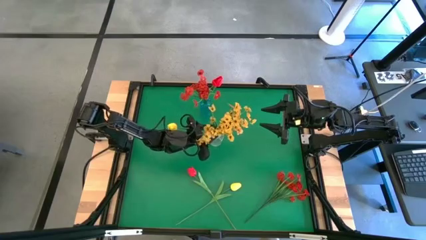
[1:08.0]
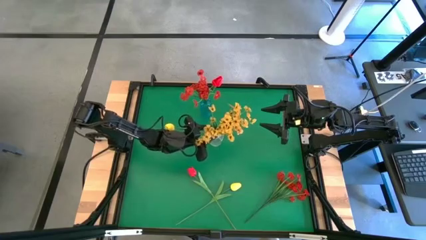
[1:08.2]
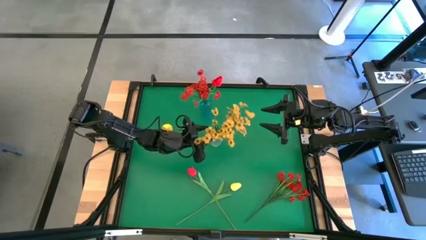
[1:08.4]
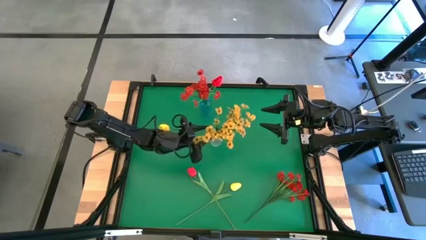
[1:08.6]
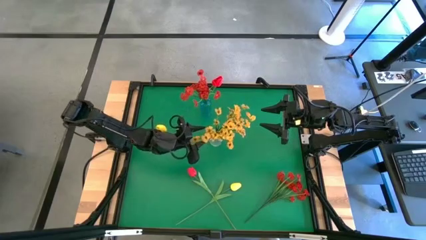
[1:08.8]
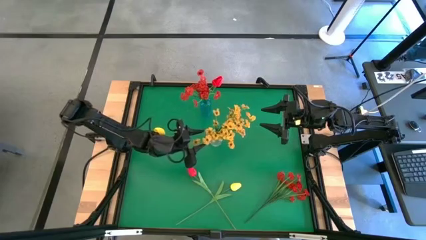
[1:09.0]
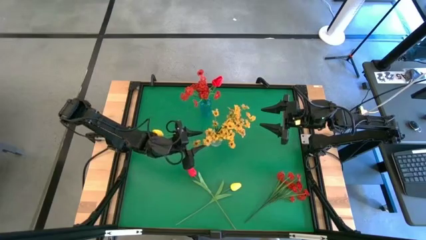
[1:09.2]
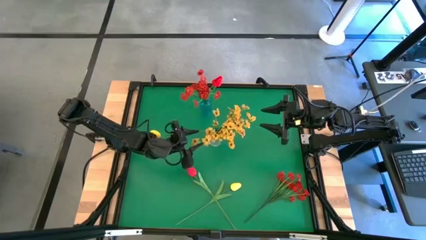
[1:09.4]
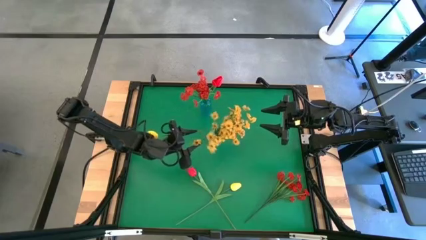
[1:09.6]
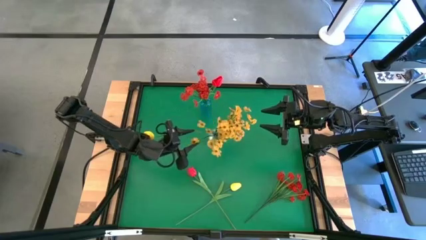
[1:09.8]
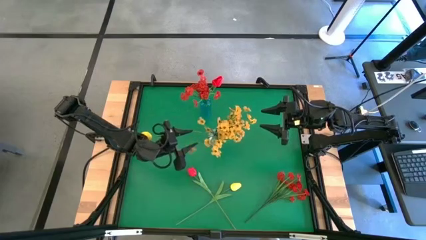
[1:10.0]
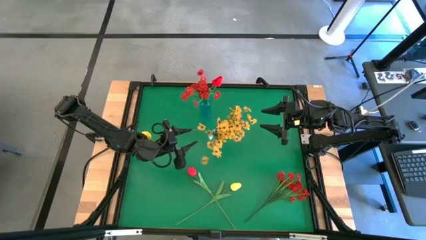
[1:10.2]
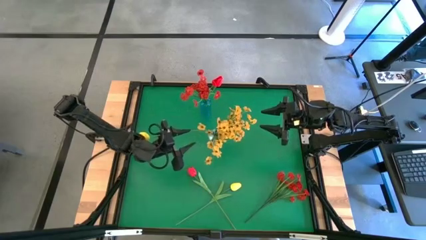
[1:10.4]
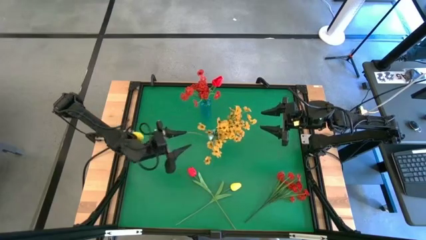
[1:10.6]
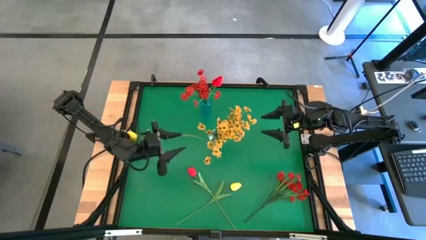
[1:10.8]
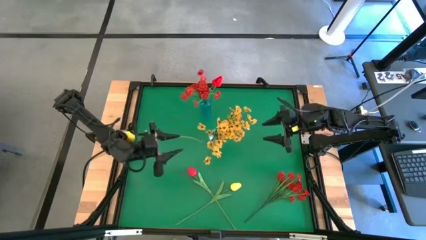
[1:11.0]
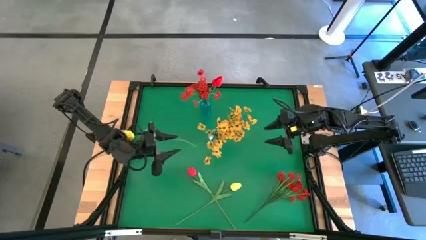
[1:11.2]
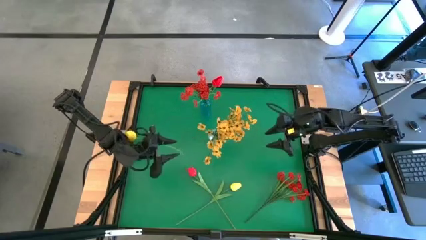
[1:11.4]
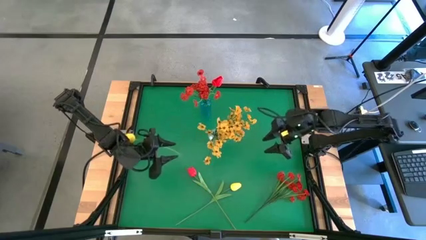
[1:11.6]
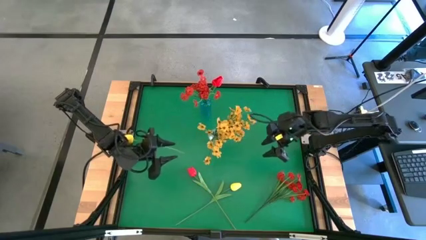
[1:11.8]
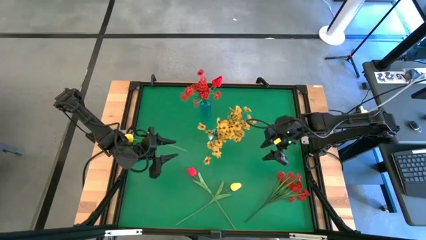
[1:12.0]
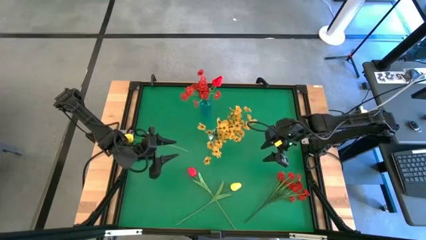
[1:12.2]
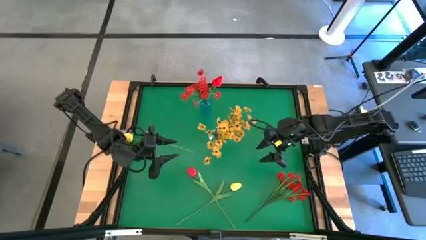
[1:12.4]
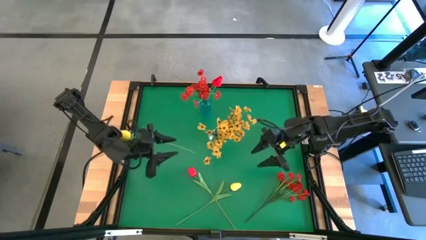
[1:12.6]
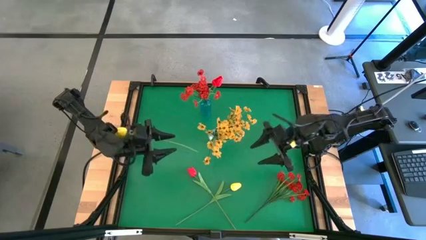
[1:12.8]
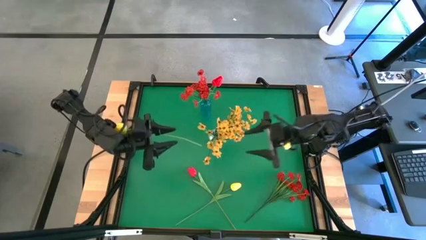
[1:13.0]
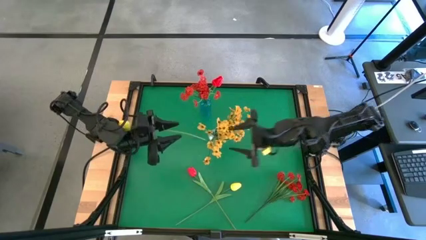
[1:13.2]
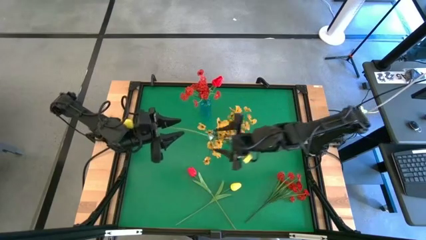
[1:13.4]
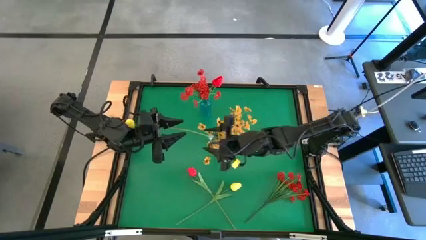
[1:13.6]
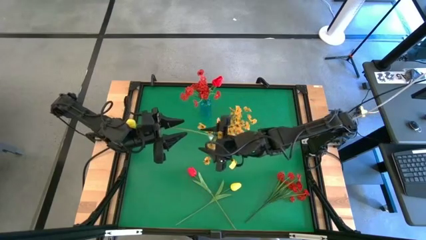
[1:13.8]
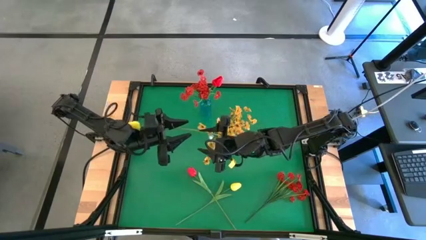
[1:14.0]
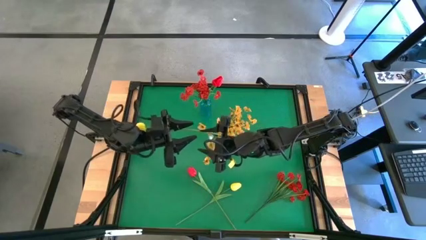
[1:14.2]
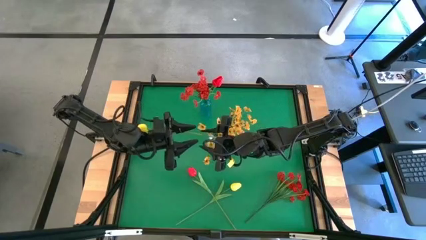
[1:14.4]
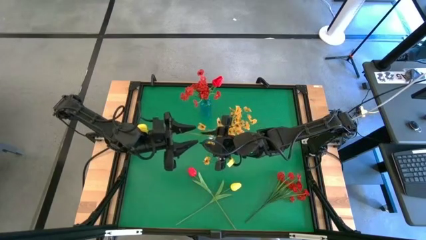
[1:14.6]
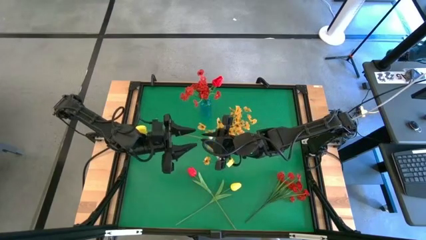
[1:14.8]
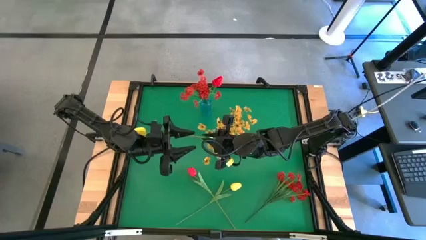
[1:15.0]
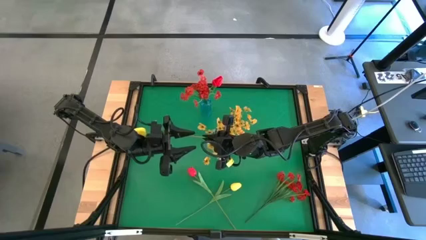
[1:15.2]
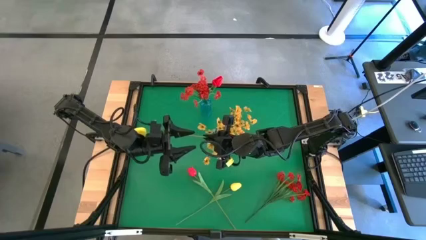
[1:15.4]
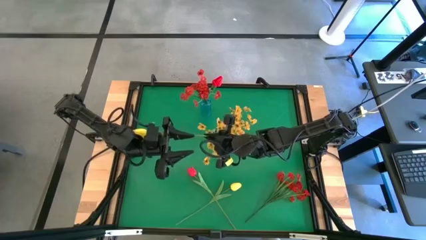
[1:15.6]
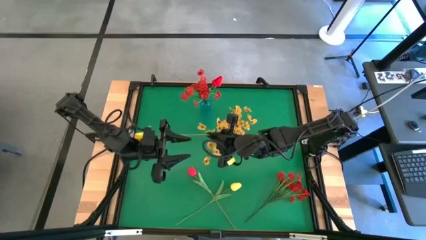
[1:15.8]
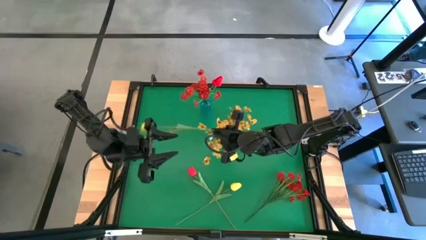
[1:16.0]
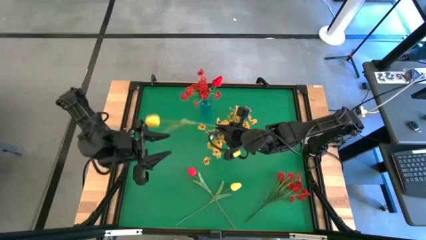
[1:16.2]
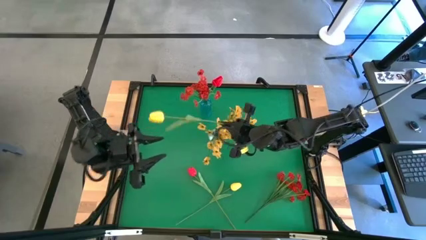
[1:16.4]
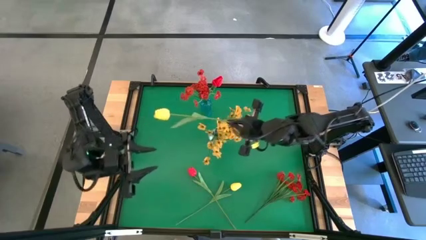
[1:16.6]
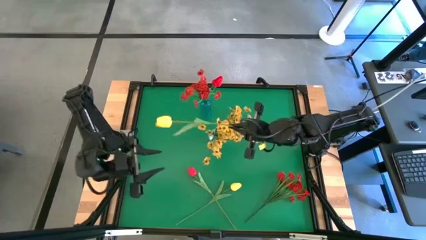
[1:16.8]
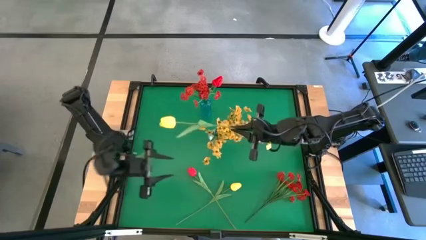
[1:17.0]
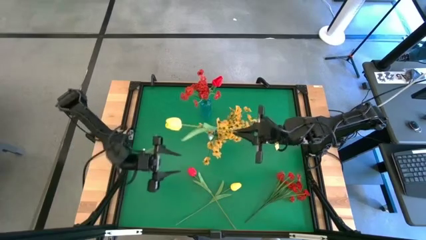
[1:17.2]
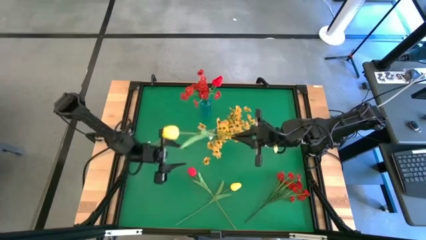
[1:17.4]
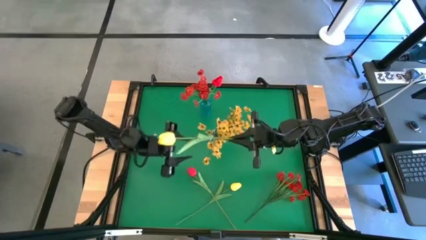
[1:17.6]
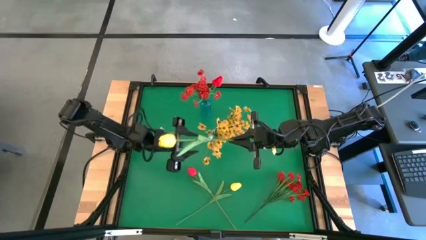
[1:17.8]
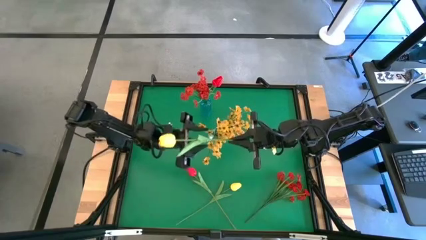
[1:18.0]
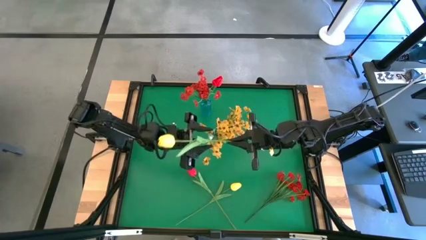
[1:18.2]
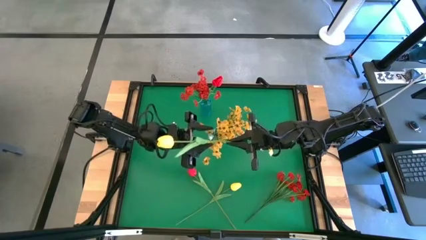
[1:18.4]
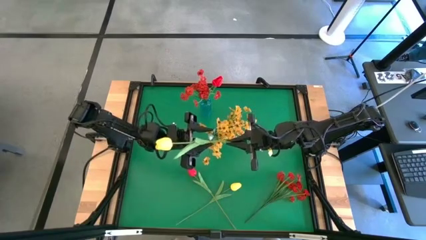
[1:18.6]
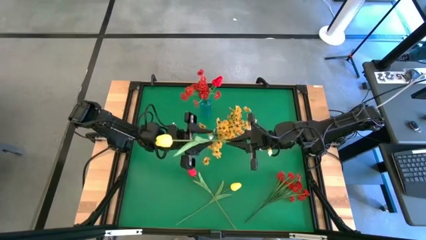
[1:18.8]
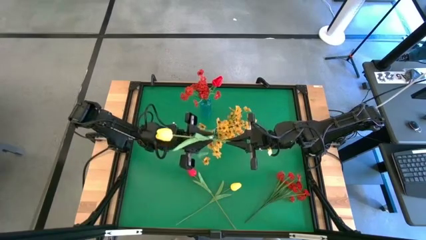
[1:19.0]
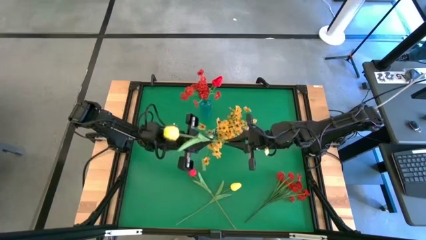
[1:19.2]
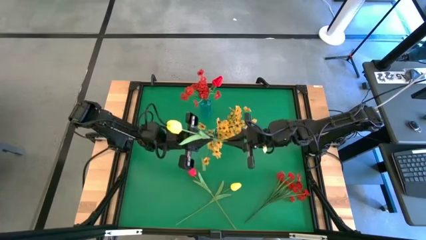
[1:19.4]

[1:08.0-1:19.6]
Task: Sort flowers into vase by color
Adjust the yellow flower in the transparent vase
